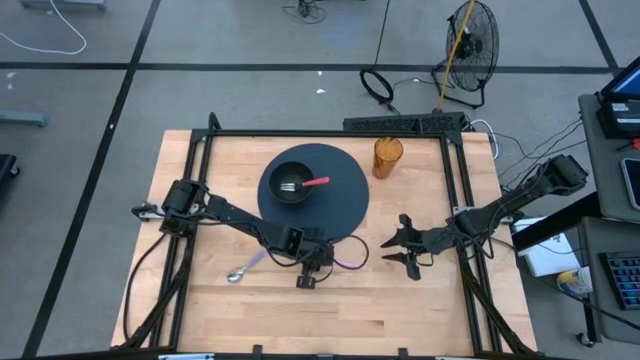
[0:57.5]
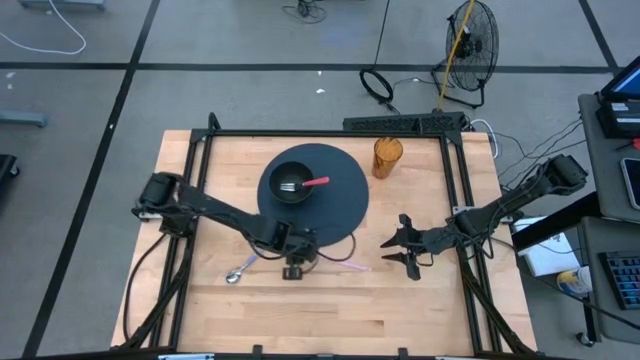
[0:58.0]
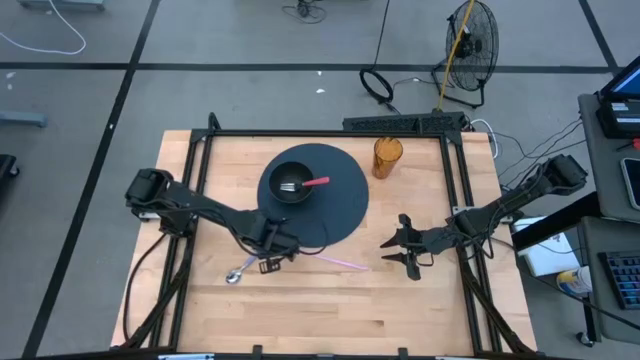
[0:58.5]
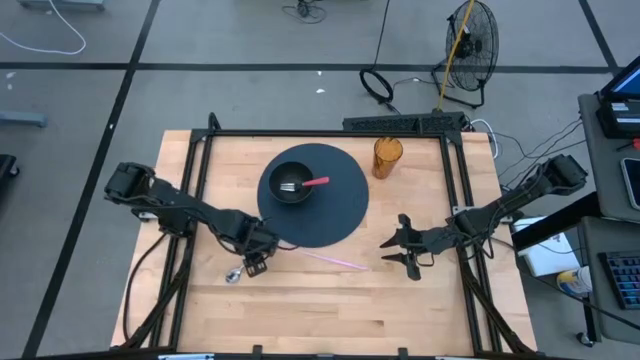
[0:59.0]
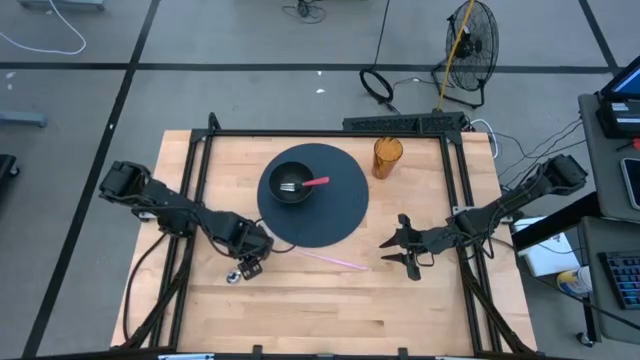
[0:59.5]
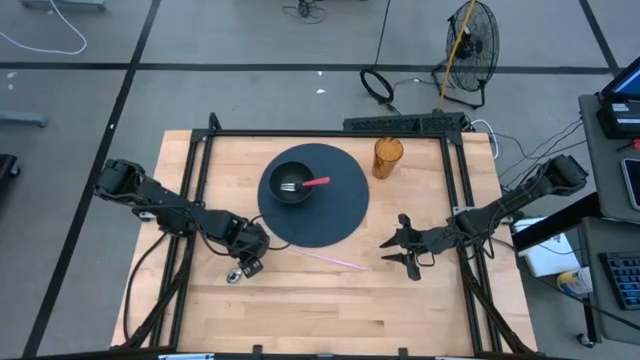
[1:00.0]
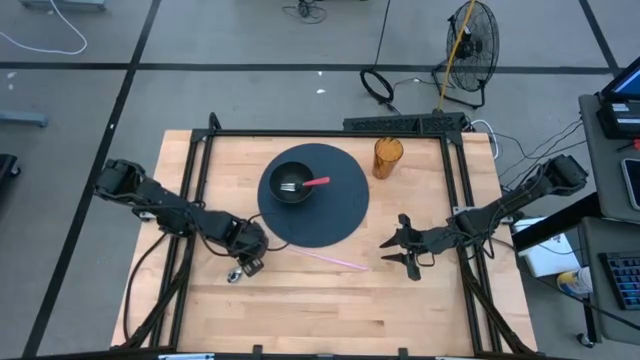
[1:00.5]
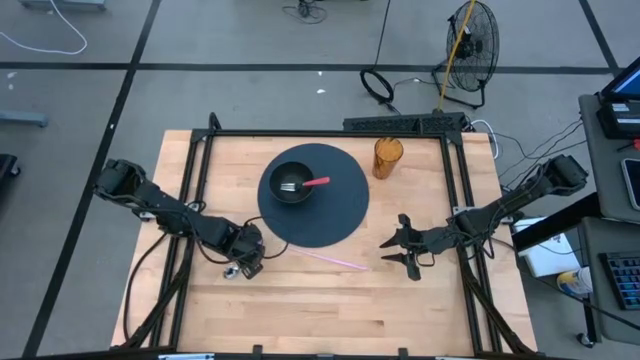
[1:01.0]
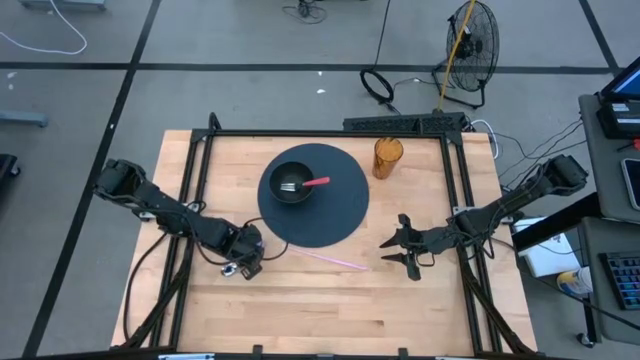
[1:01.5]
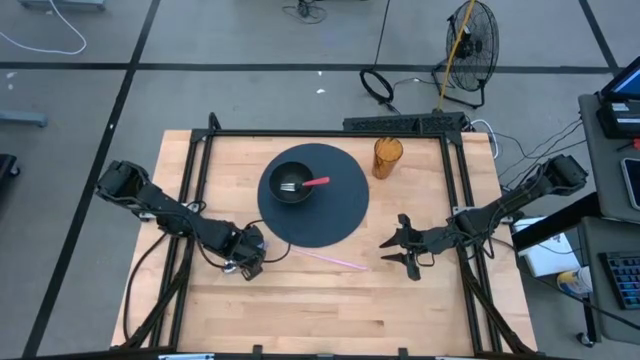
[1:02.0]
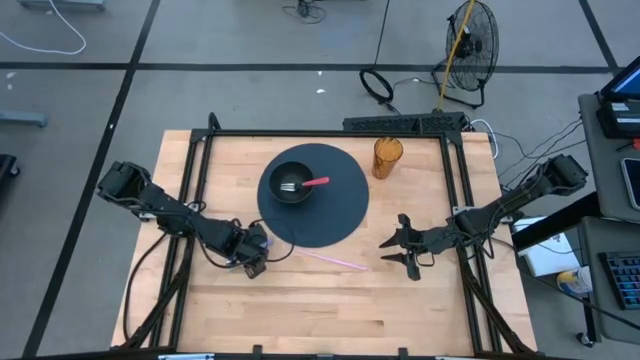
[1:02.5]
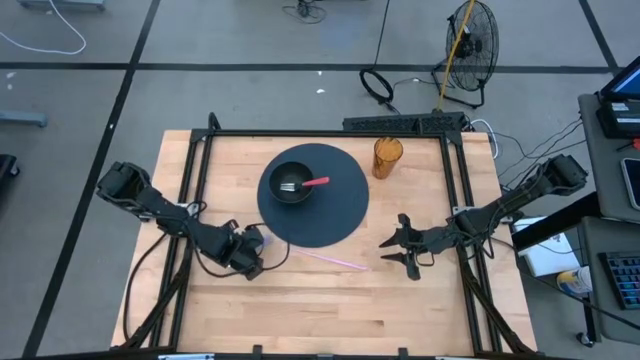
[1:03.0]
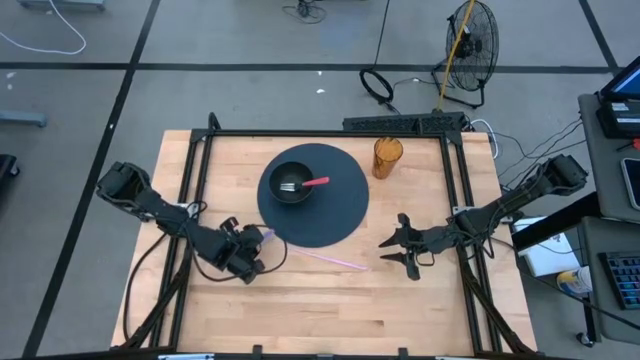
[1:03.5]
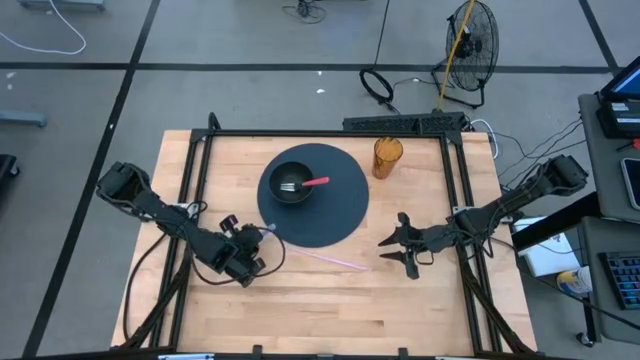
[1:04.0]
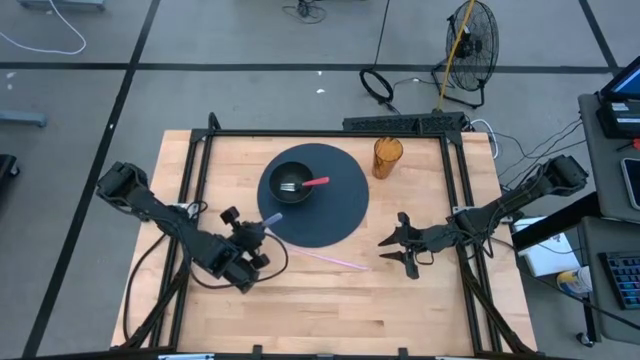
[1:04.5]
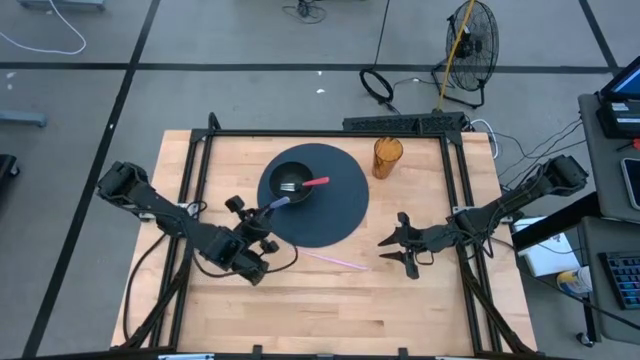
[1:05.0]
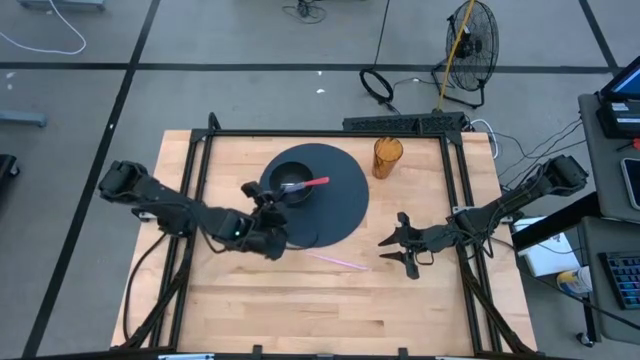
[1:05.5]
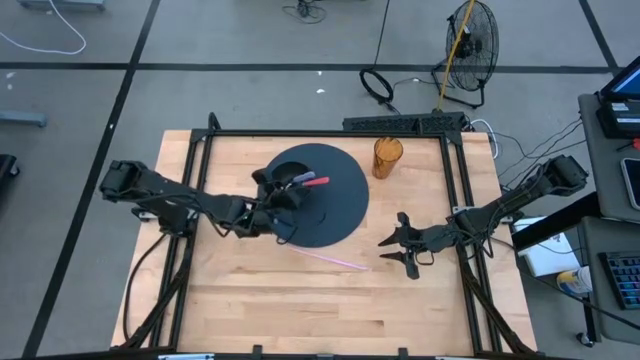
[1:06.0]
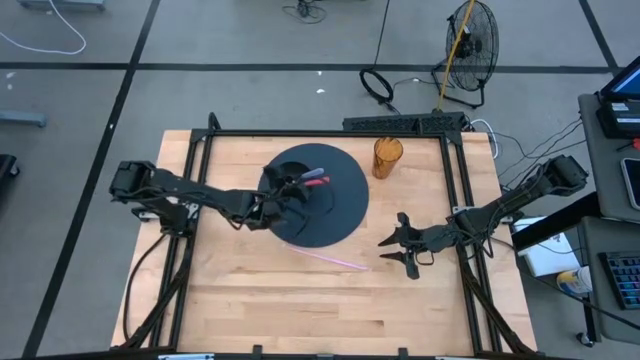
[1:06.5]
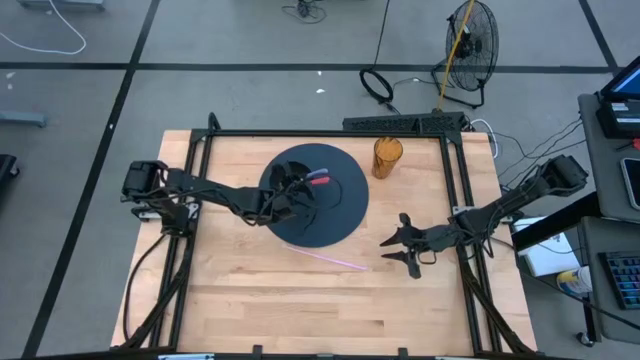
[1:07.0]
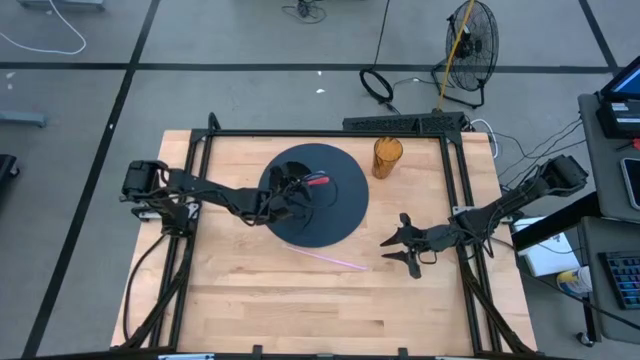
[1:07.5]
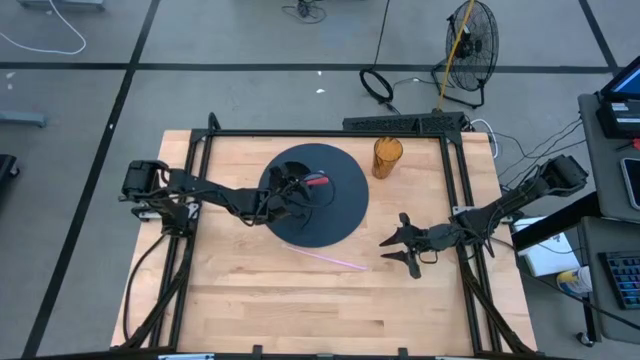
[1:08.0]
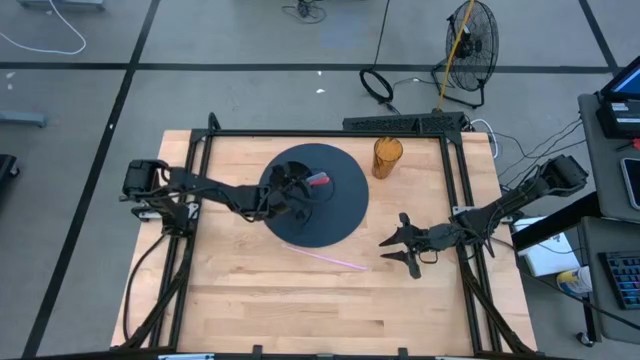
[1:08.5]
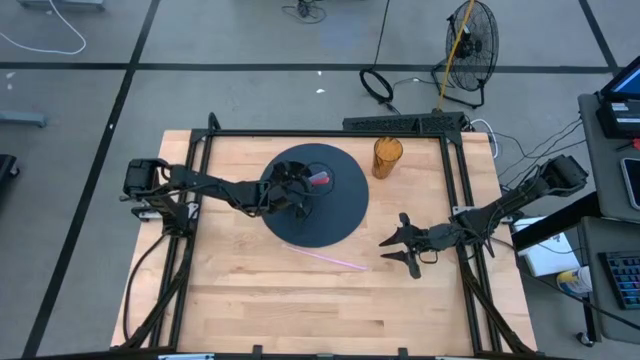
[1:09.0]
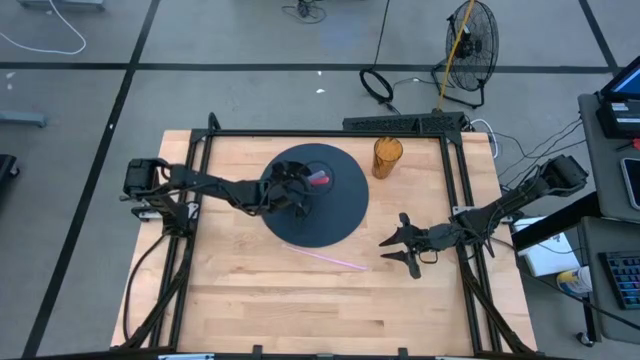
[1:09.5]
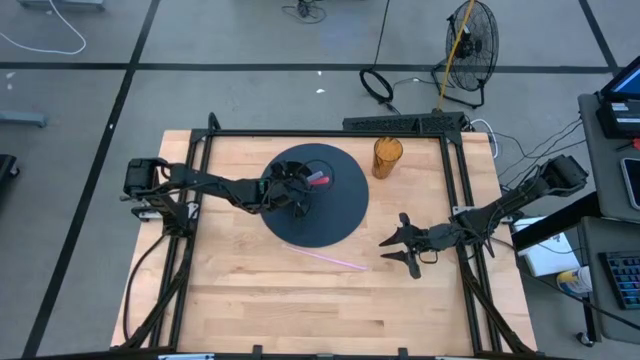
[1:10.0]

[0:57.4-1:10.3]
Task: Pick & Place Utensil
Put the blue spoon into the bowl

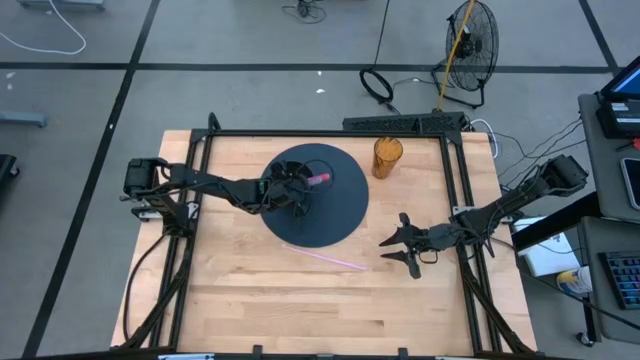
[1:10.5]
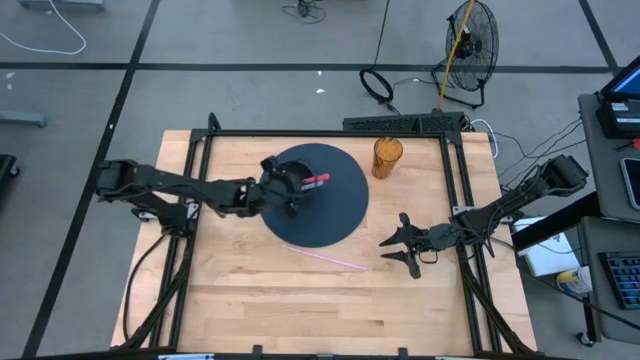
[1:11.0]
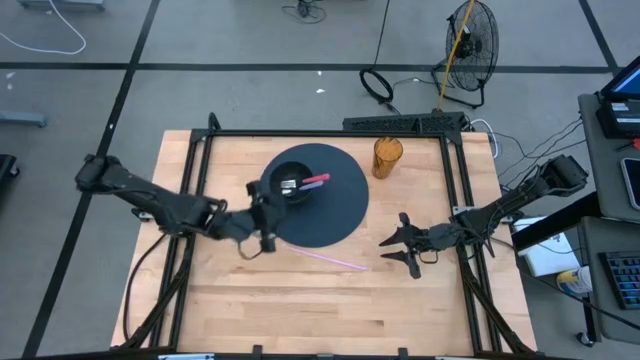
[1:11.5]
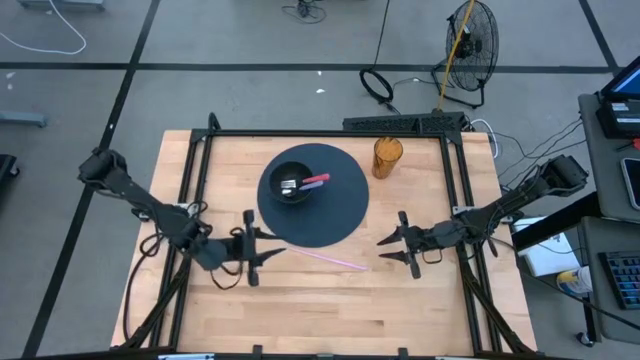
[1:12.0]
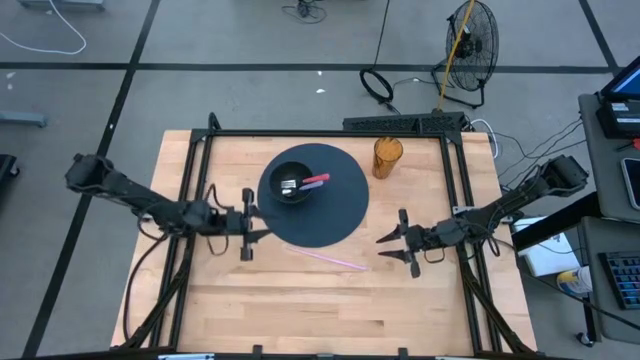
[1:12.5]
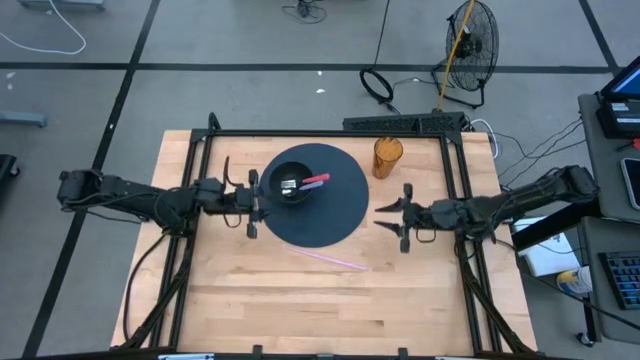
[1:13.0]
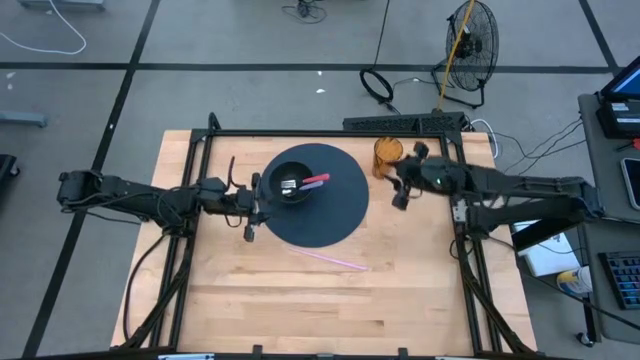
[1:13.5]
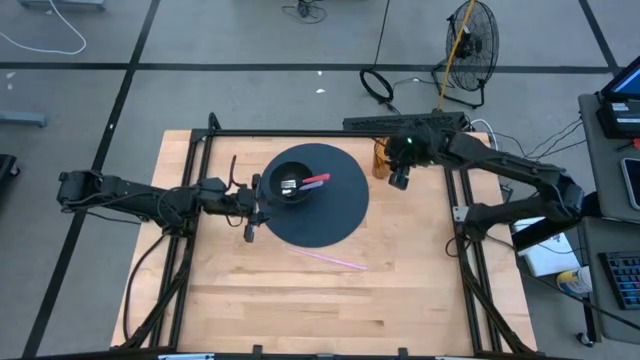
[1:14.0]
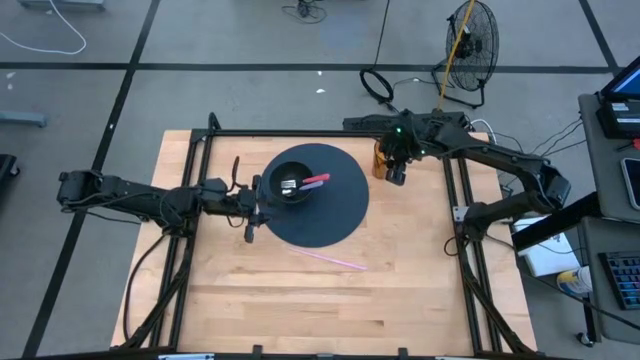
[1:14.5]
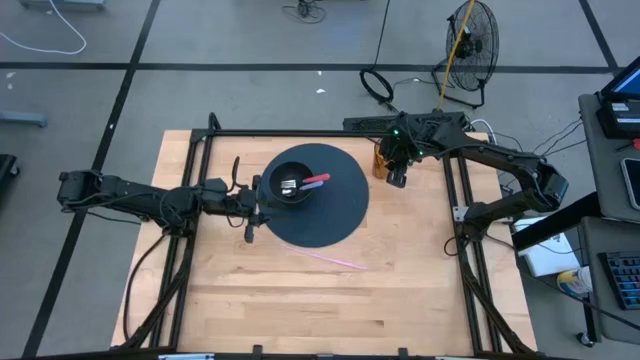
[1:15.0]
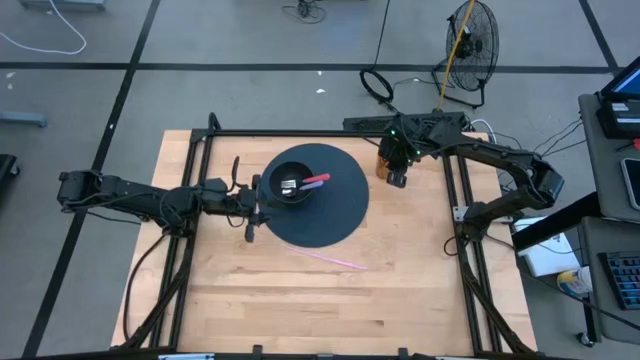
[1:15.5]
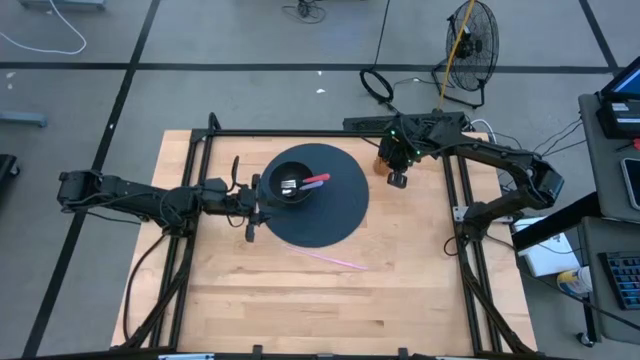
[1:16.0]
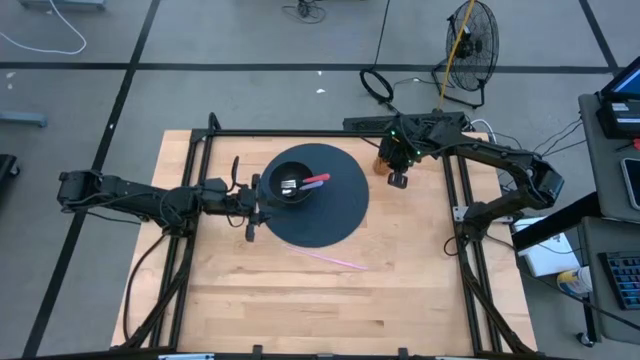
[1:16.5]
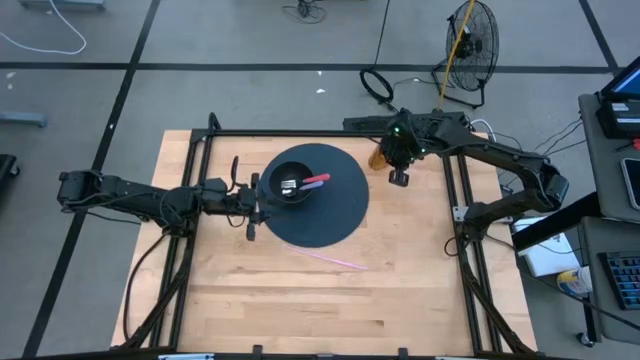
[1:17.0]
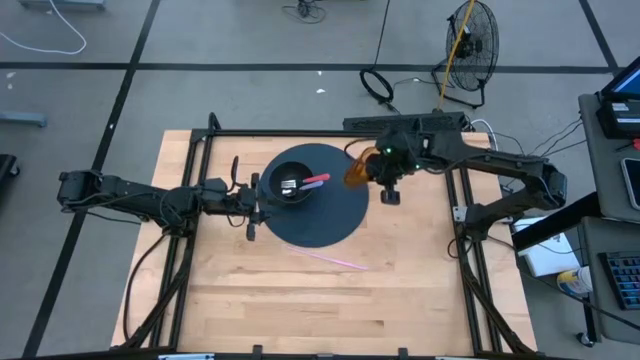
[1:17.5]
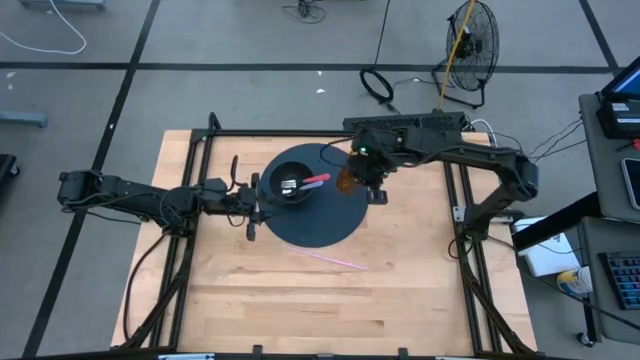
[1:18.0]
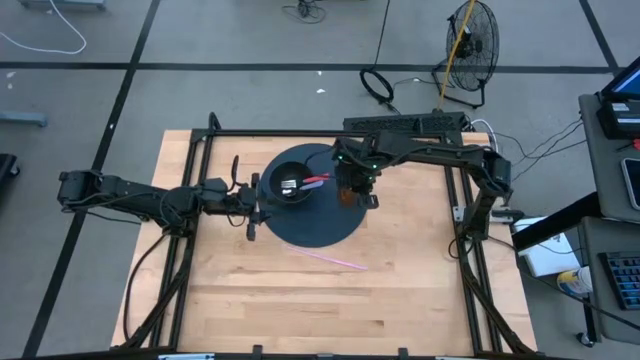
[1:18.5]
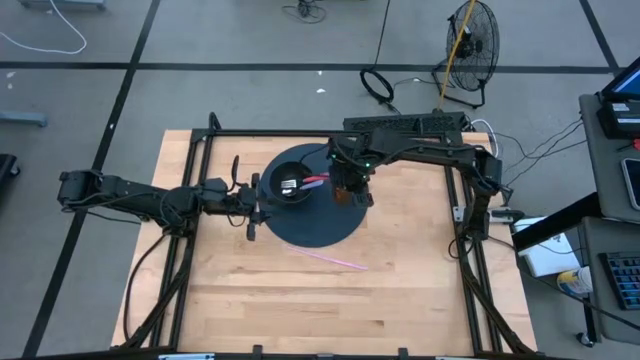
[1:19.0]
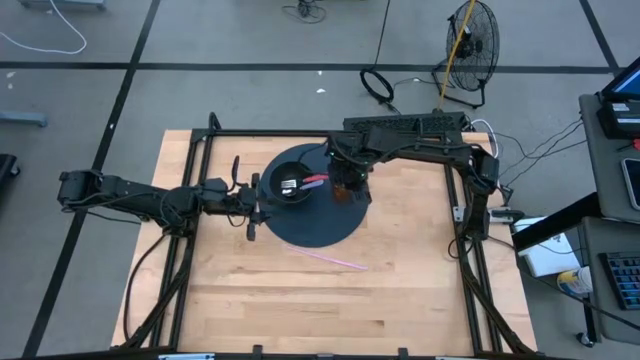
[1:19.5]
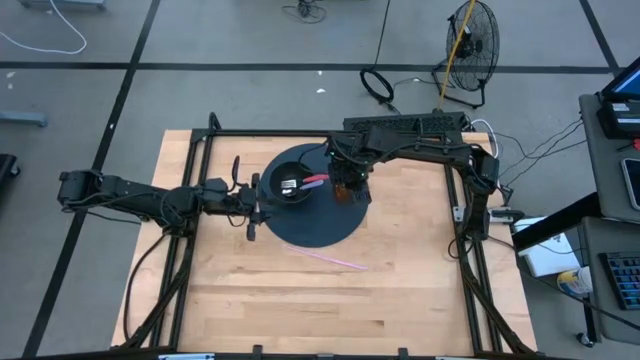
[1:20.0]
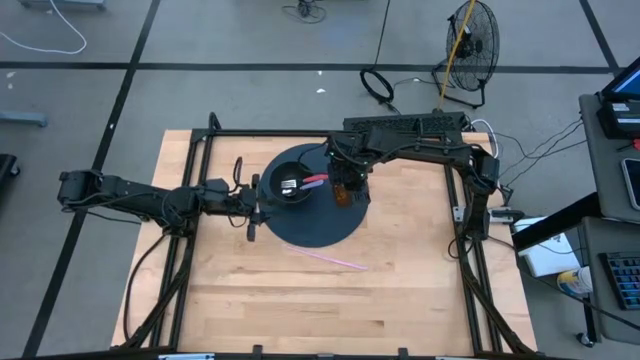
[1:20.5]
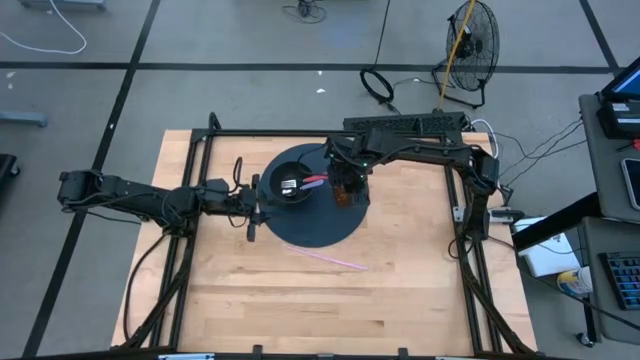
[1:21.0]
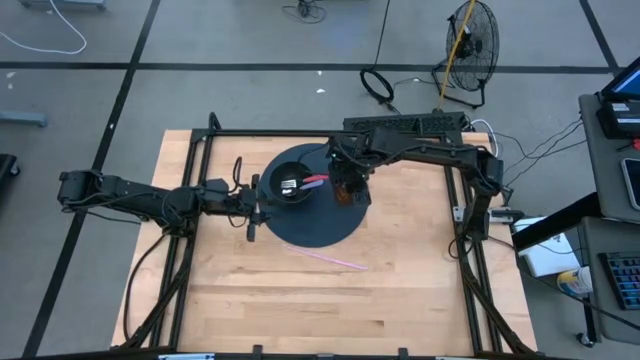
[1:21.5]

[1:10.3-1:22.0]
Put the brown glass on the placemat
